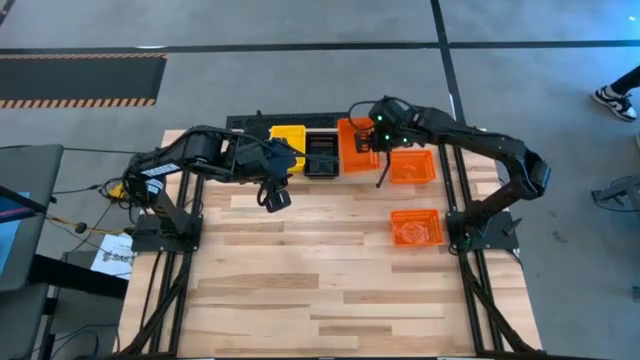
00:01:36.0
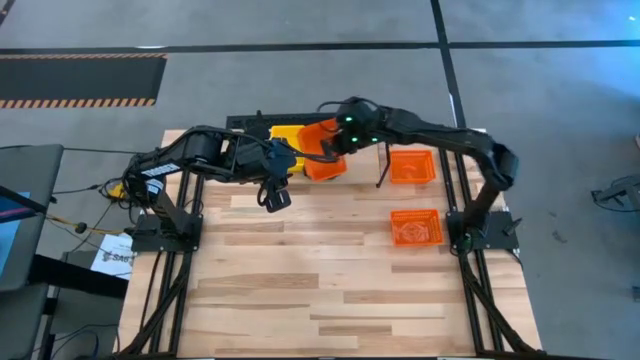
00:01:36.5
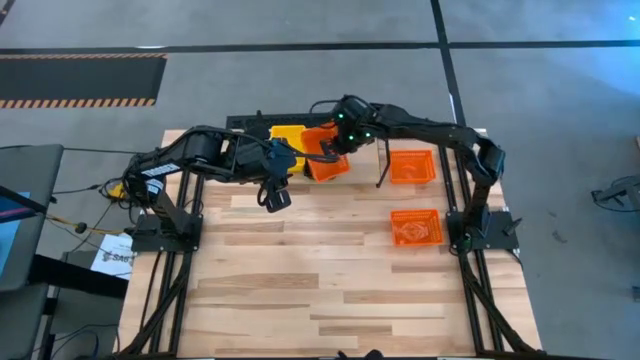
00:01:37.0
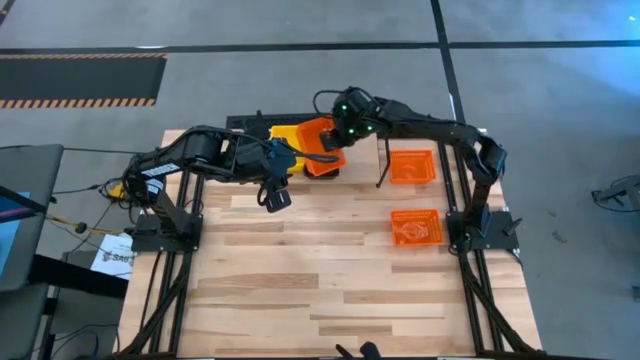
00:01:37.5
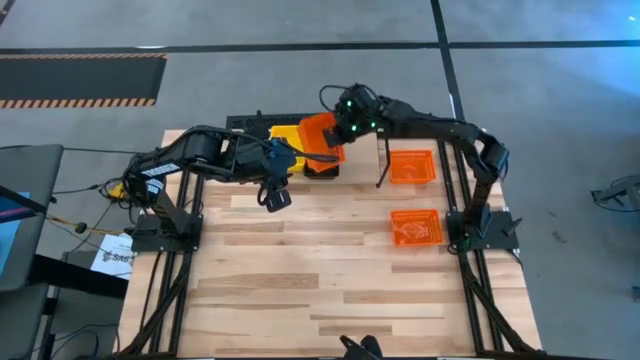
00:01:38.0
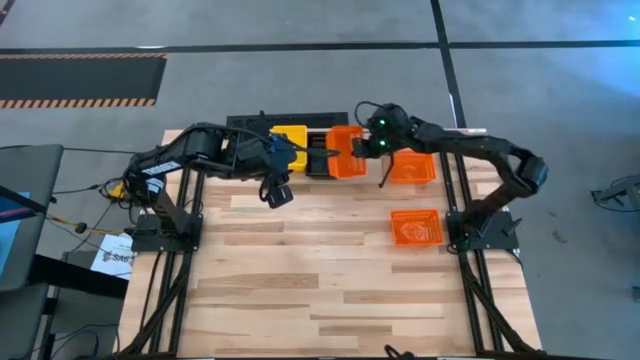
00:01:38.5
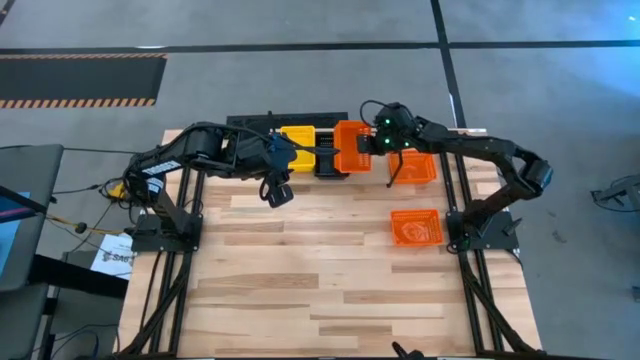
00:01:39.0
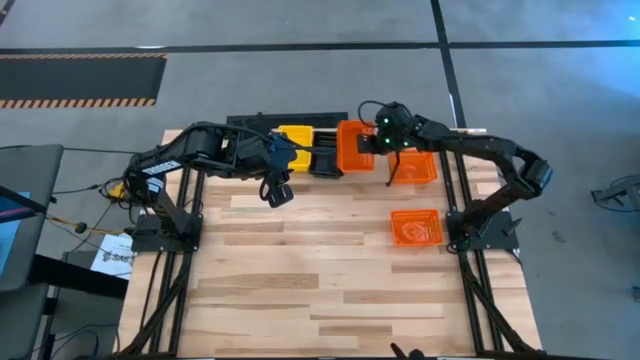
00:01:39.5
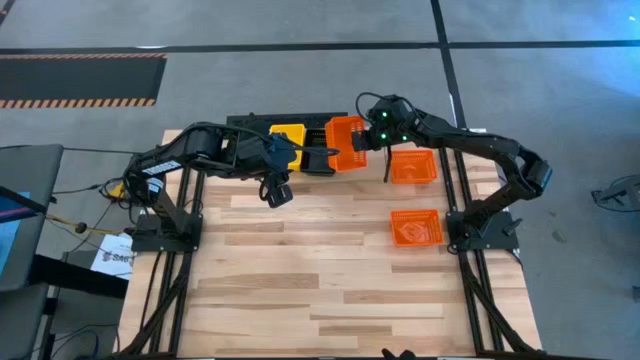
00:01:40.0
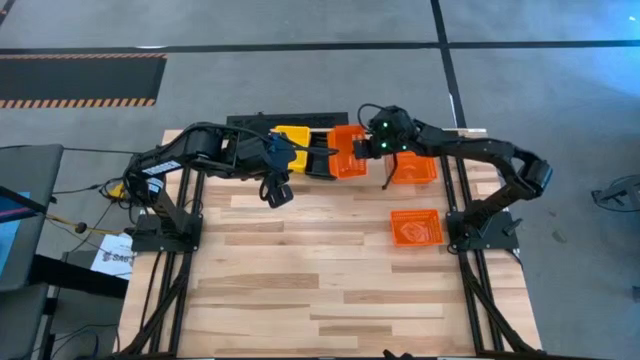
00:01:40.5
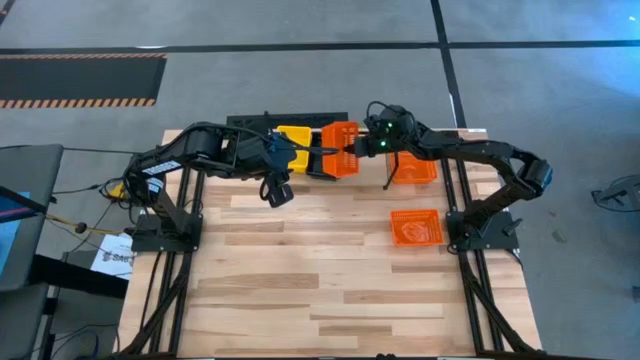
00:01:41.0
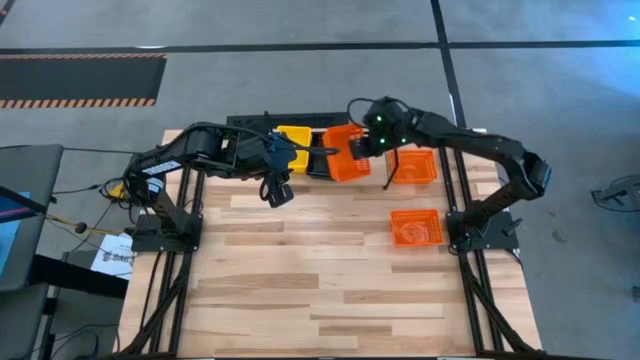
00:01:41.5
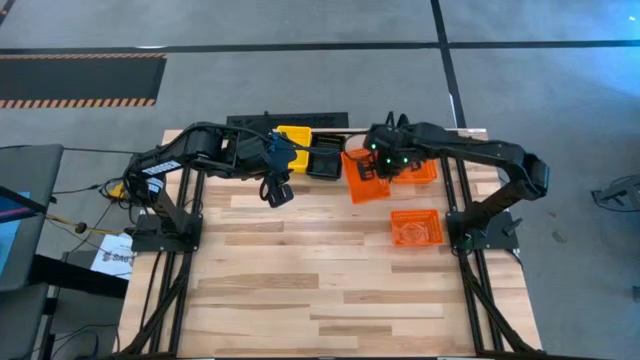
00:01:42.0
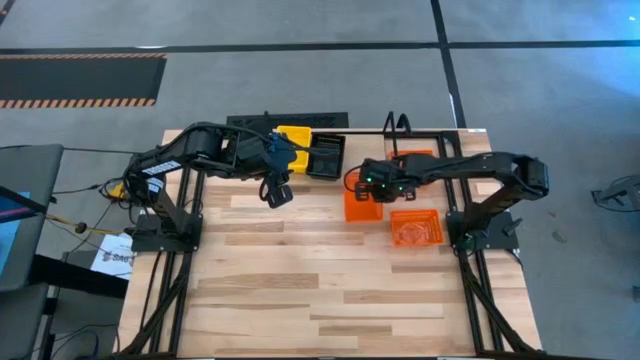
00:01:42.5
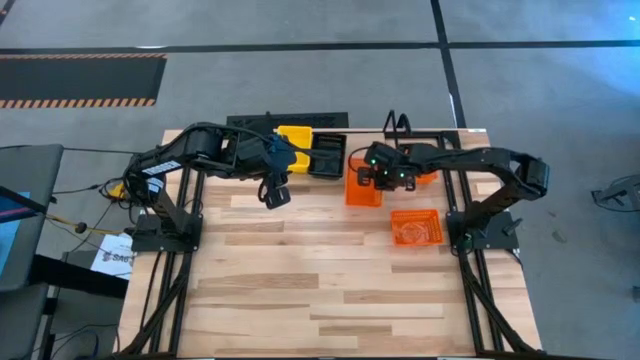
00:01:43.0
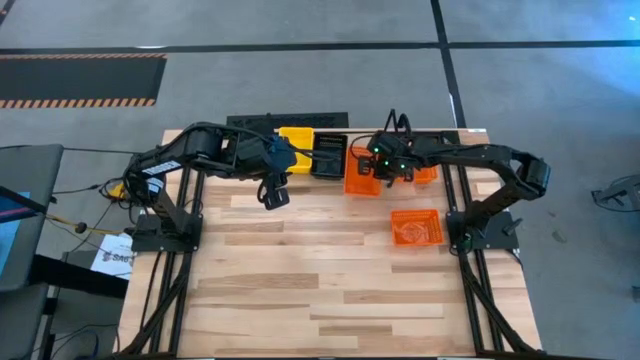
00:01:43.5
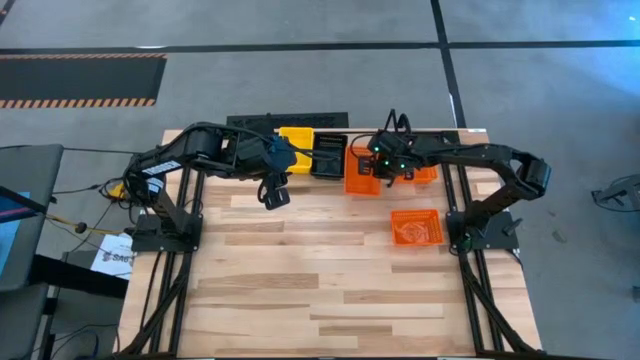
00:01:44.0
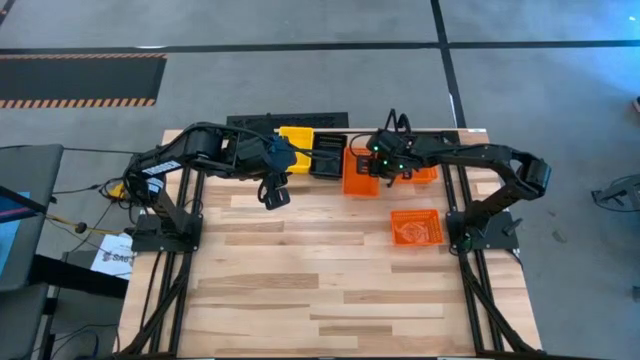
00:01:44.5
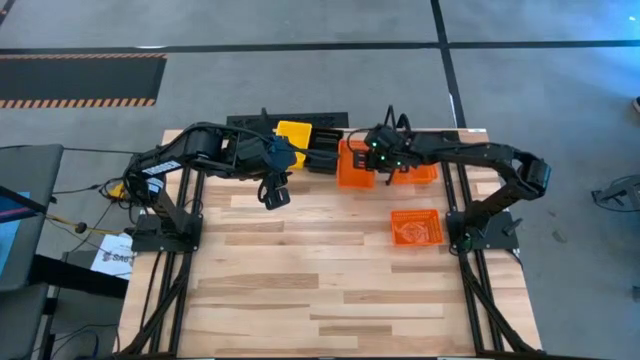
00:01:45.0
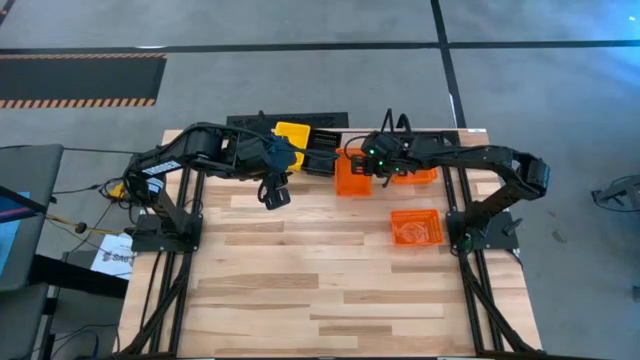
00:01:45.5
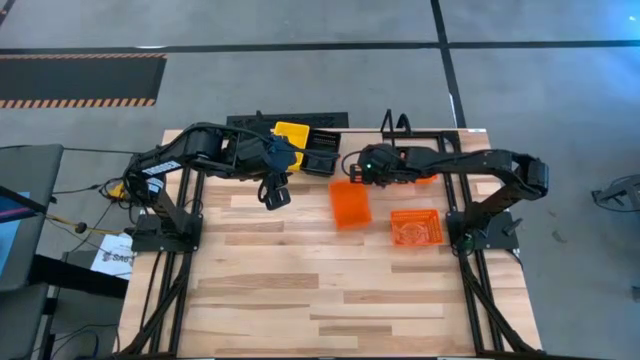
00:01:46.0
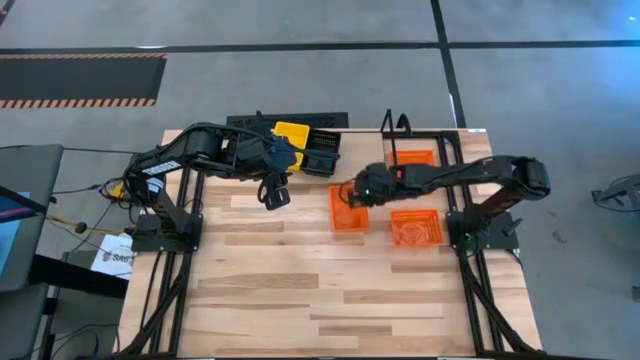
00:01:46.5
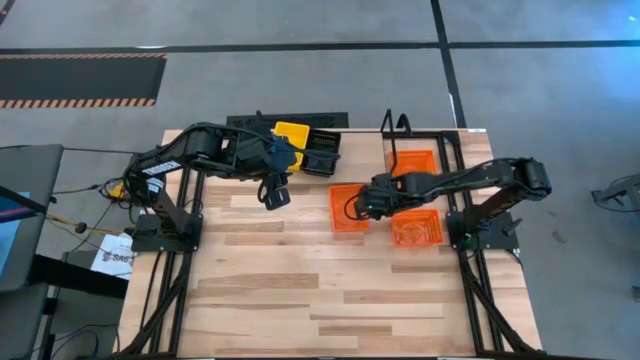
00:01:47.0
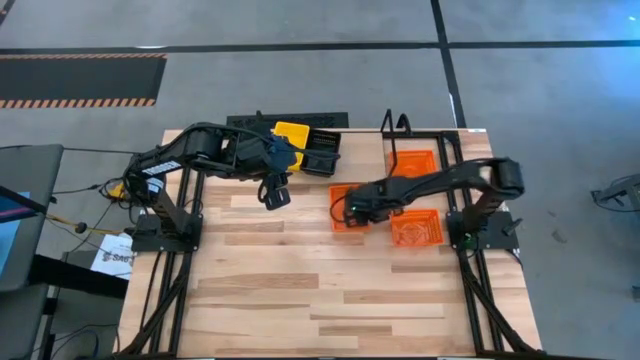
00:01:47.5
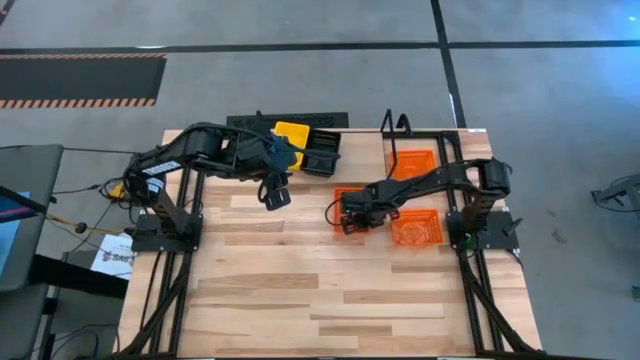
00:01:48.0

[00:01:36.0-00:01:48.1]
Task: Stack baskets on shelf by color
Put the bottom orange bin on the shelf

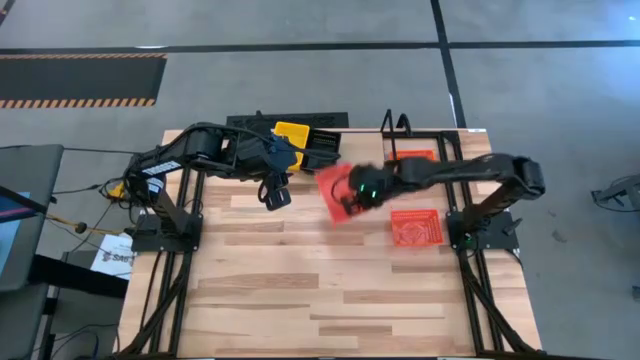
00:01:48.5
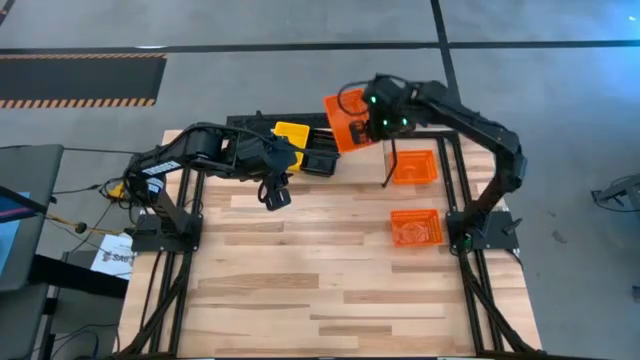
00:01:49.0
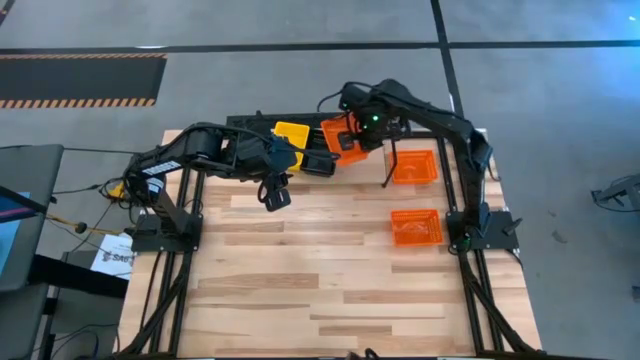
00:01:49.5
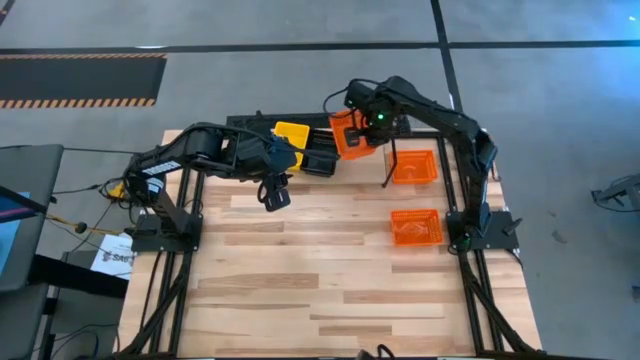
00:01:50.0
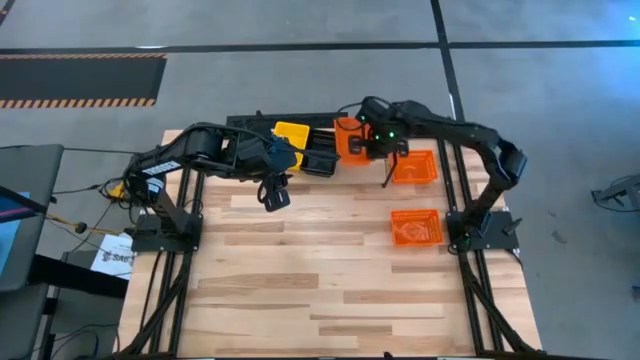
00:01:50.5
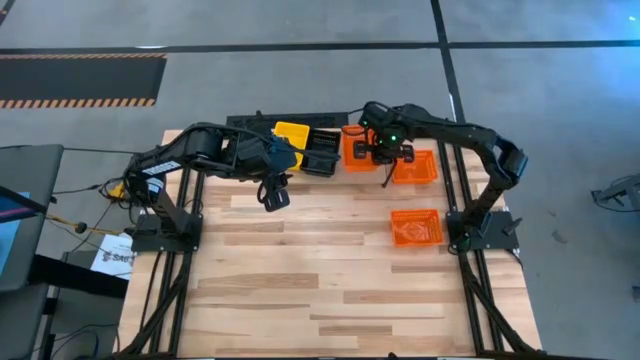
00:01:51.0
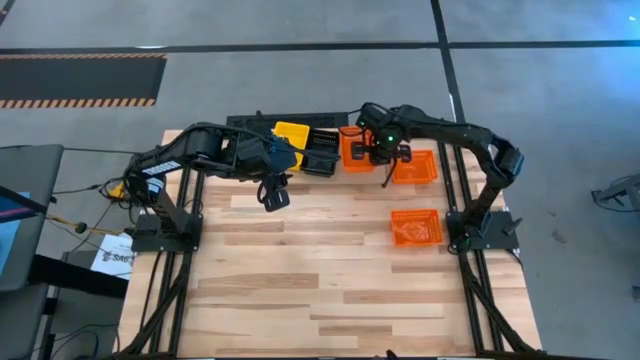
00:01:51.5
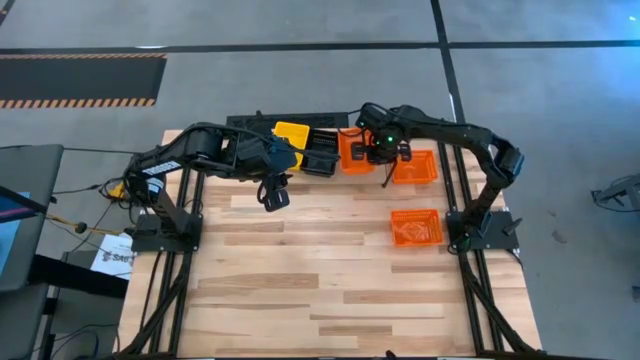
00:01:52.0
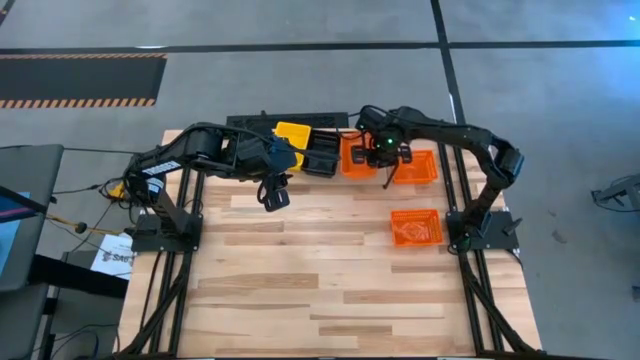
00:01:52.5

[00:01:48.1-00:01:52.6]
Put the bottom orange bin on the shelf

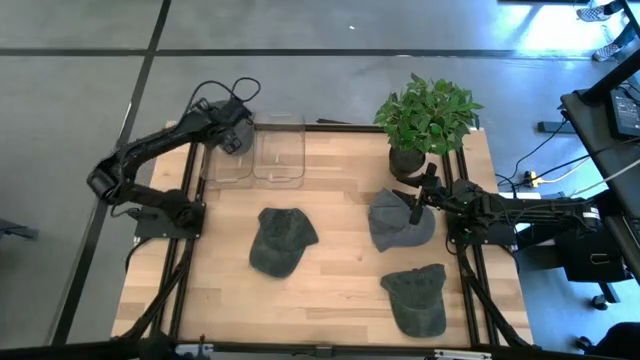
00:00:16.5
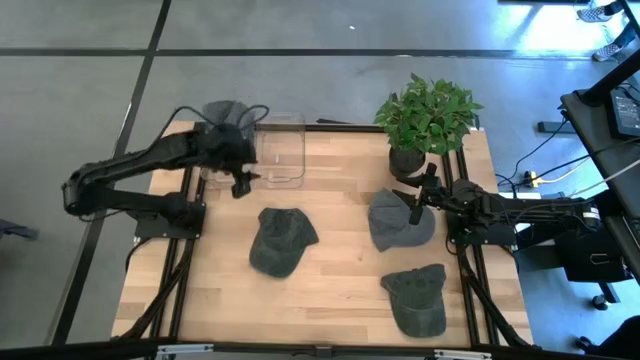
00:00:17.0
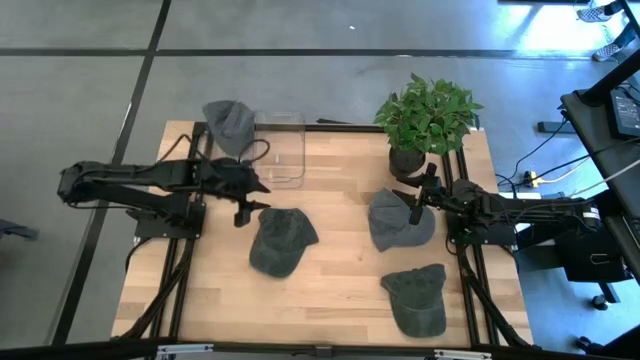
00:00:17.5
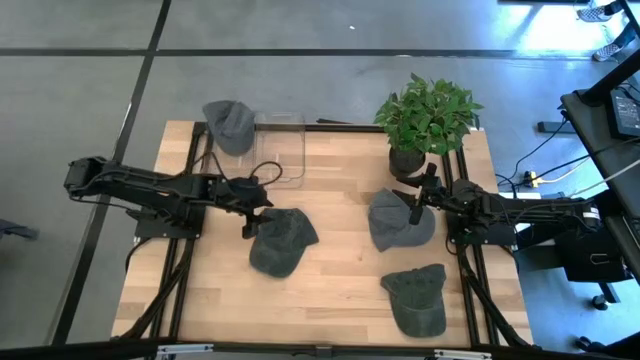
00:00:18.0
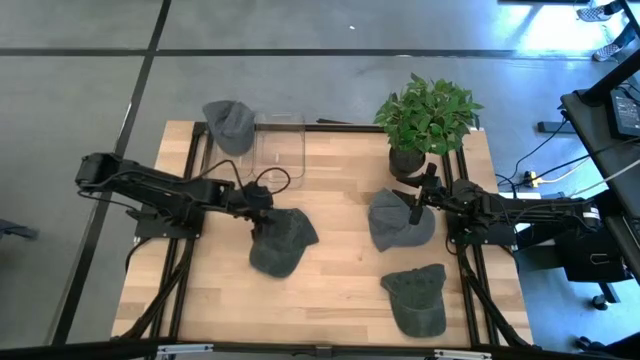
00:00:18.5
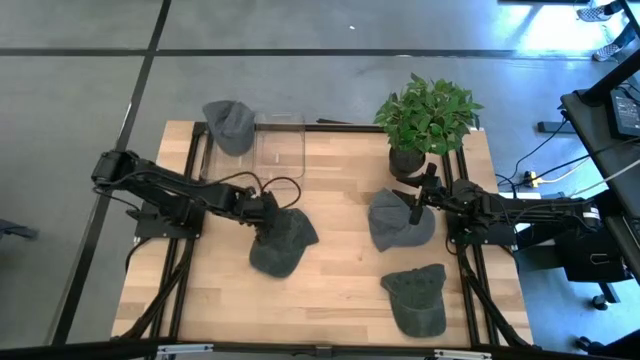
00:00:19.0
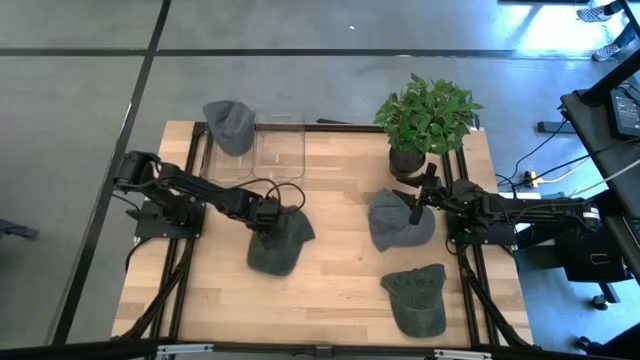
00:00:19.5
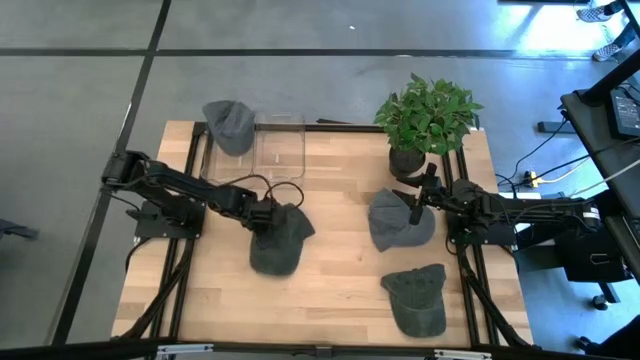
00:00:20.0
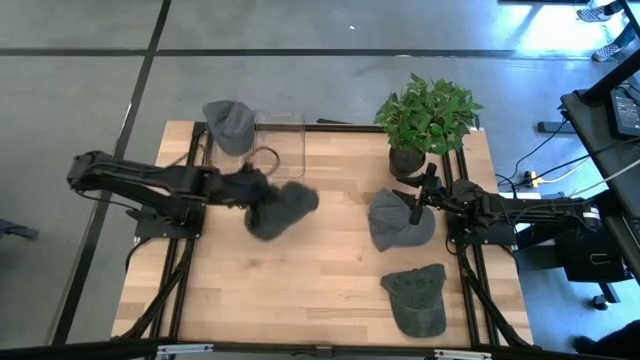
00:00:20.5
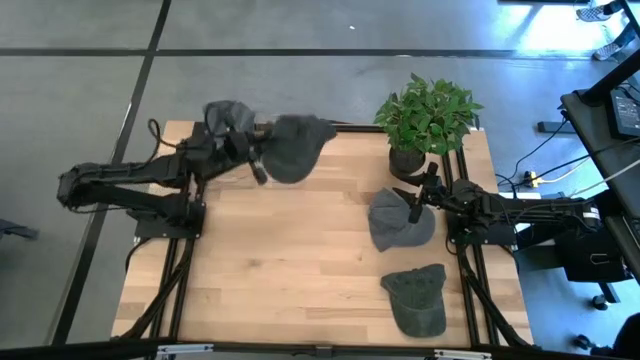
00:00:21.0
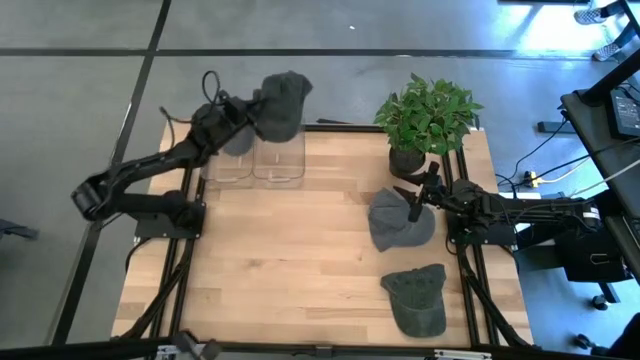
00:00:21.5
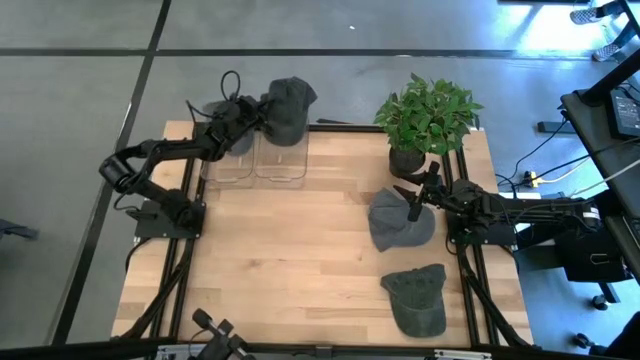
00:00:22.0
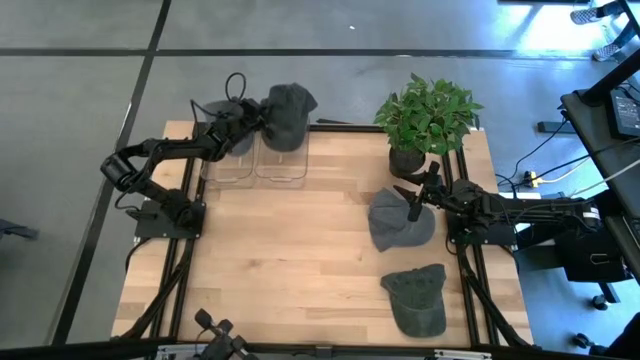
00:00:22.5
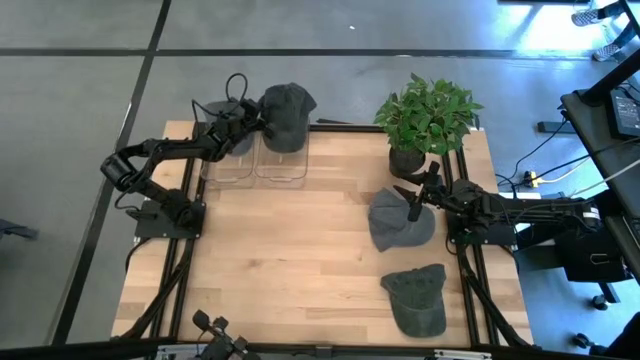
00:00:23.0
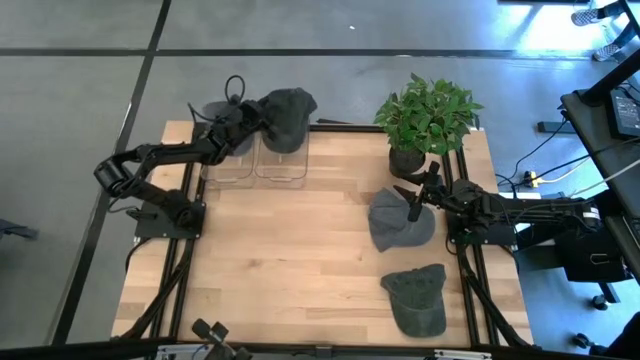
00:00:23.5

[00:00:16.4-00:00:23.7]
Task: Pick & Place hat
Put the left black cap into the right transparent bin
